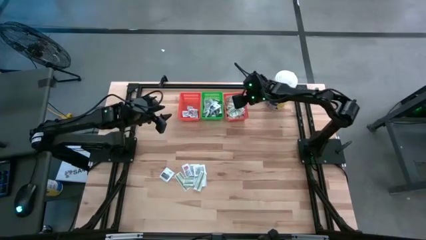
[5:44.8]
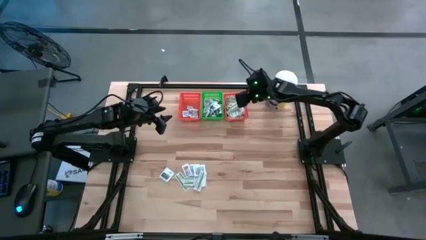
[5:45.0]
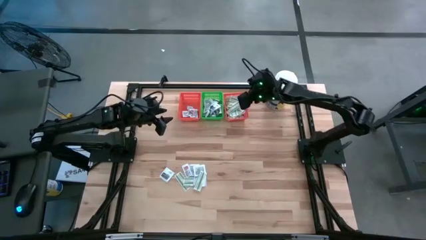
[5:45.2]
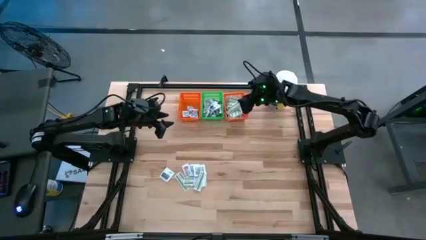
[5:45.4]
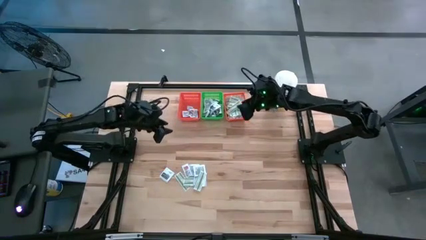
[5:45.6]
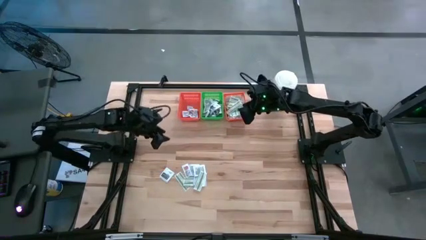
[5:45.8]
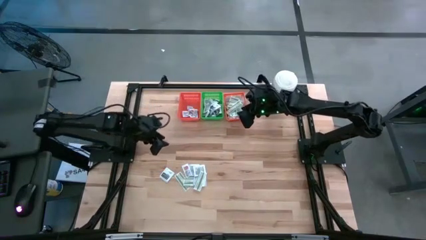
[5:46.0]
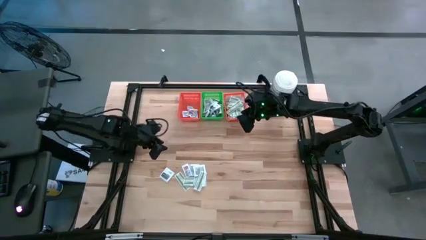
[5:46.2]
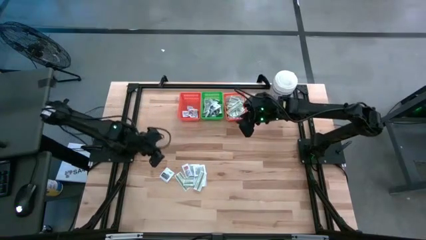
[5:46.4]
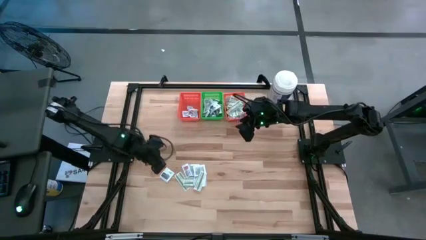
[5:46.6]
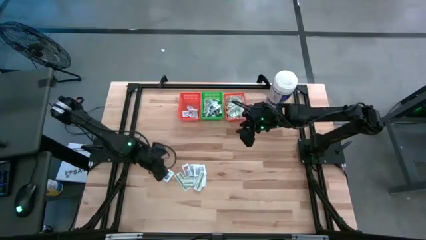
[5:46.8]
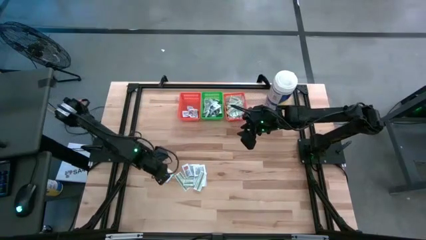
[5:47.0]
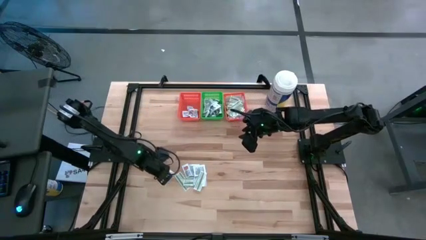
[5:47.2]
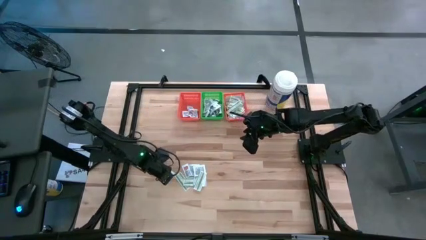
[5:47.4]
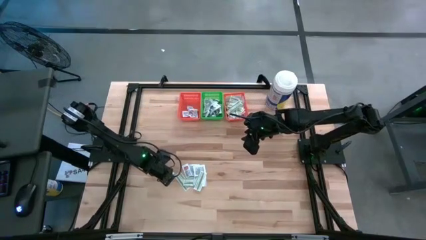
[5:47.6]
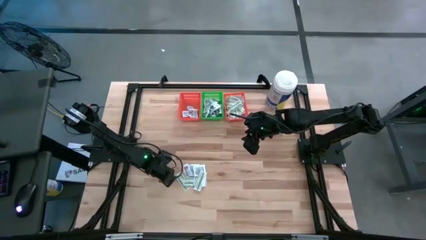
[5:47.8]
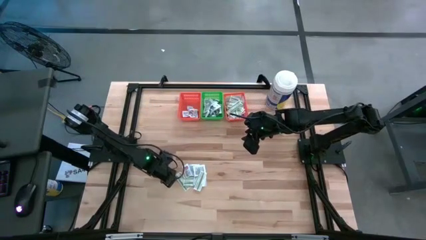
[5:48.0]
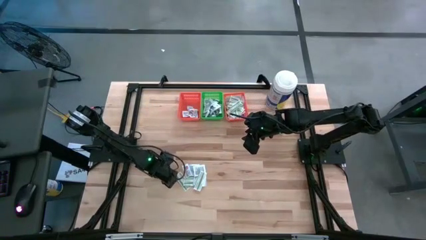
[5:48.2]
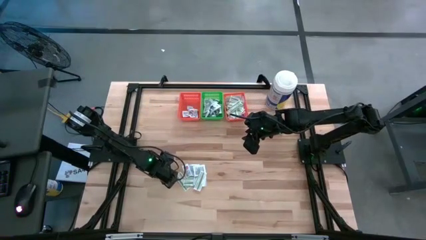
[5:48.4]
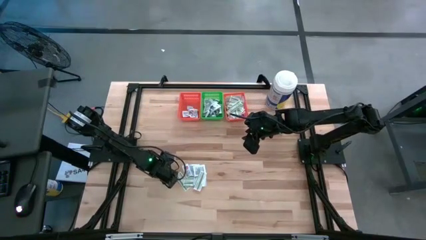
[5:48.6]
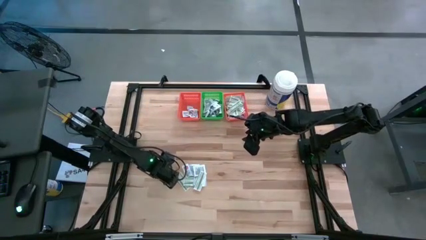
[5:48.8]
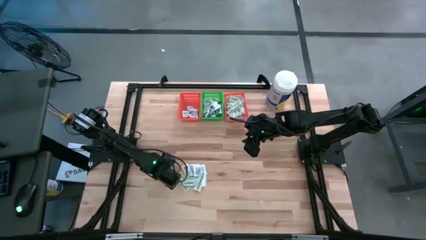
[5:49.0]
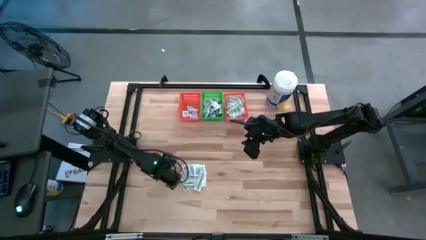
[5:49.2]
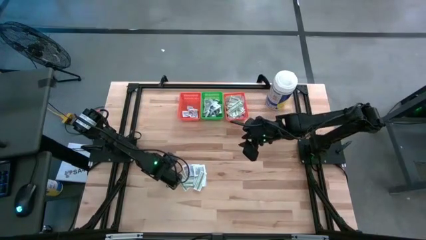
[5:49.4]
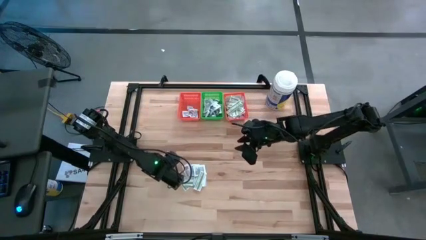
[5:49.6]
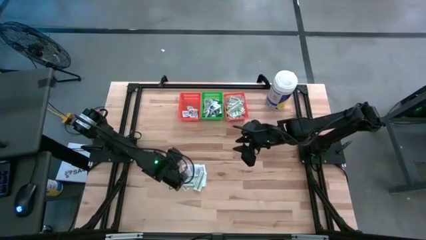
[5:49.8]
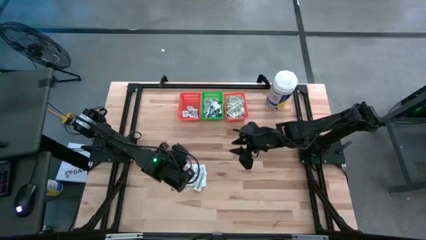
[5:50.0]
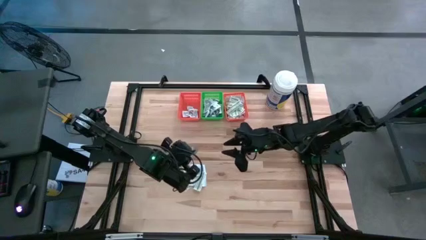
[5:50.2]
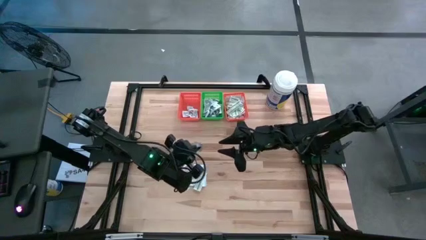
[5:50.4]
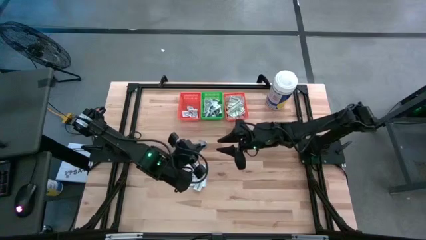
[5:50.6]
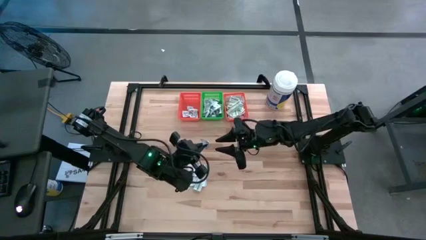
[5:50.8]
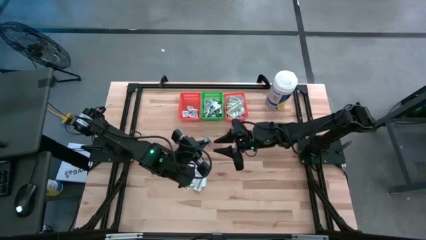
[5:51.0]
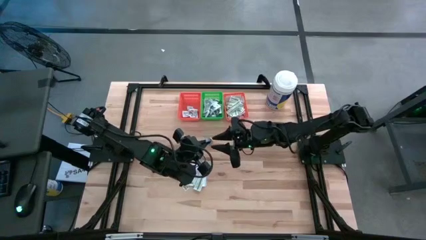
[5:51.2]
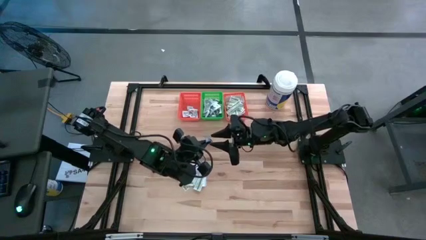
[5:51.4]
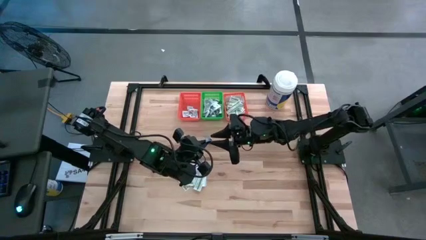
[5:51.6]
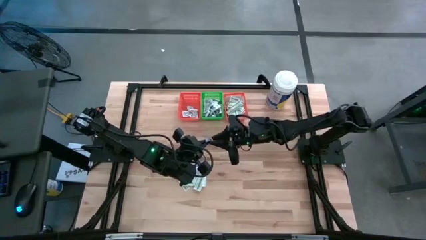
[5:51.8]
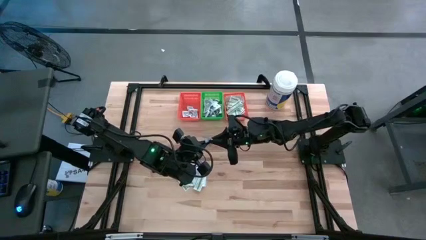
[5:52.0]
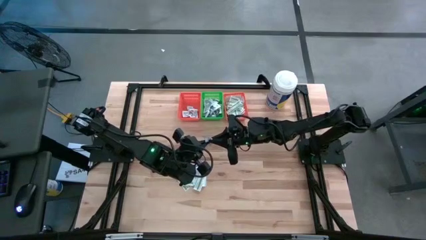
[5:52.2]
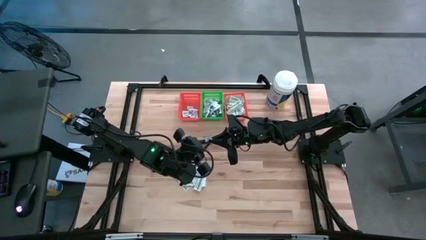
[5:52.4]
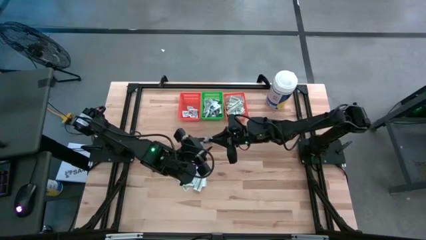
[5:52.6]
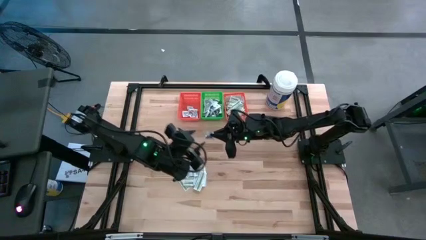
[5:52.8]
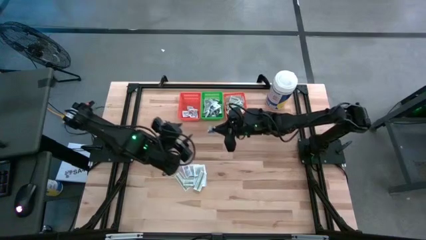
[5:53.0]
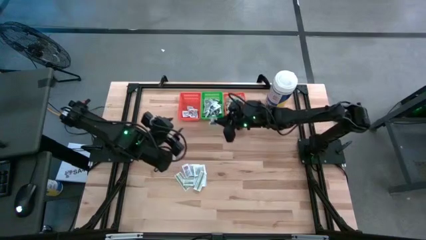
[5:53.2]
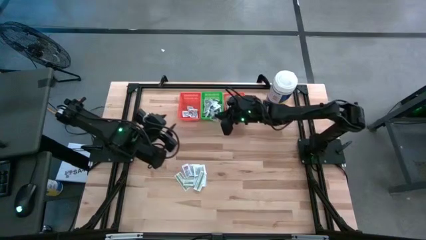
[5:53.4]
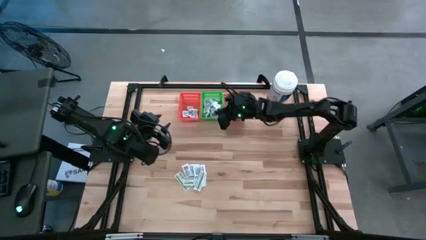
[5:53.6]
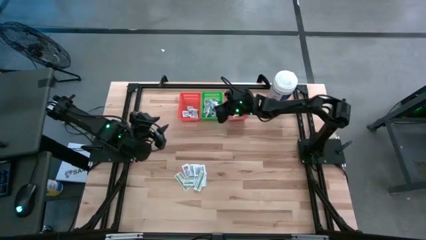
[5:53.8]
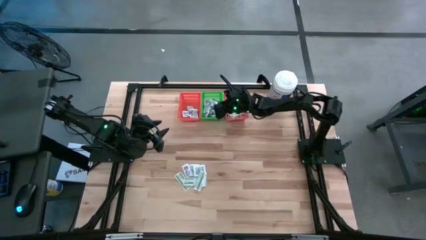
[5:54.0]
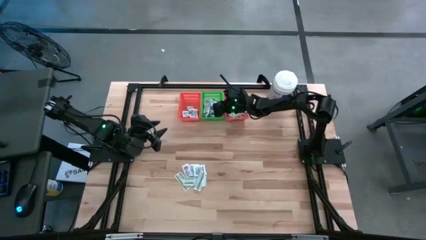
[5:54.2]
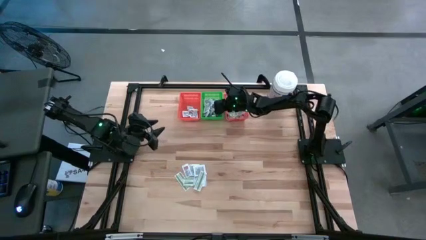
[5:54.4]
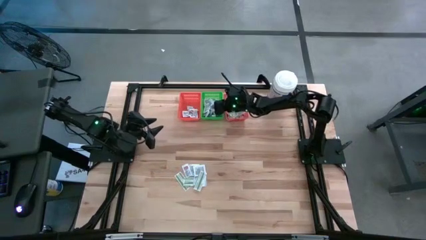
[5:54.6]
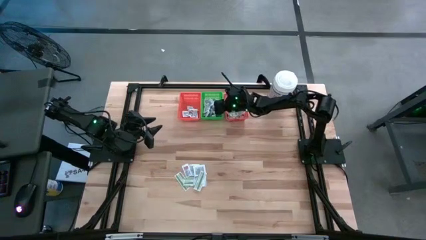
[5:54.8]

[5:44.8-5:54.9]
Task: Pick & Place First Aid Supplies
Put the towelette pack into the green bin

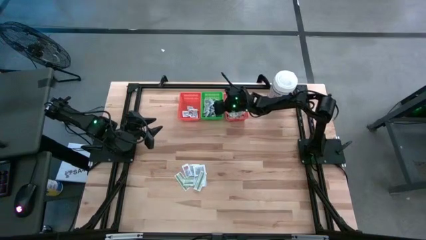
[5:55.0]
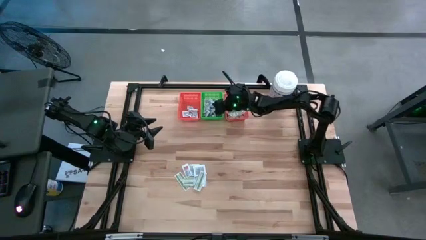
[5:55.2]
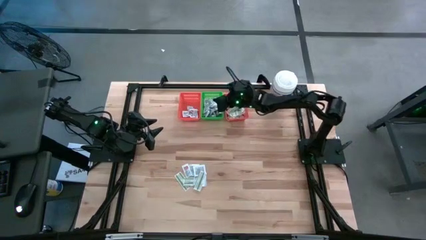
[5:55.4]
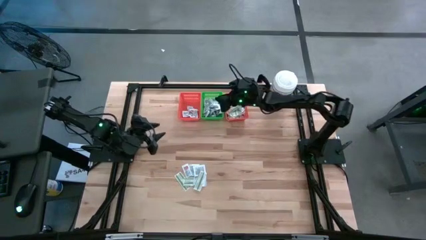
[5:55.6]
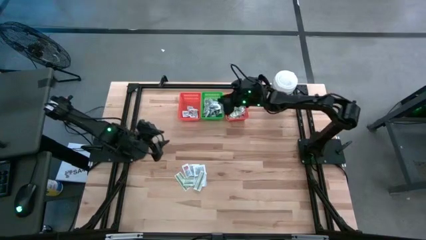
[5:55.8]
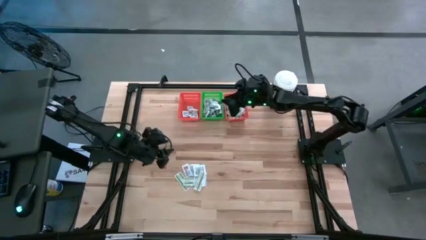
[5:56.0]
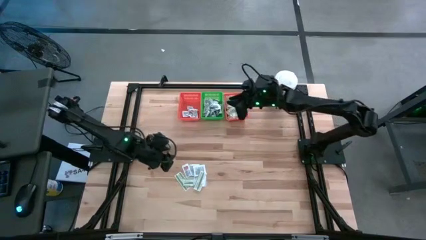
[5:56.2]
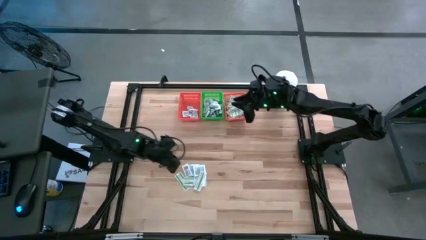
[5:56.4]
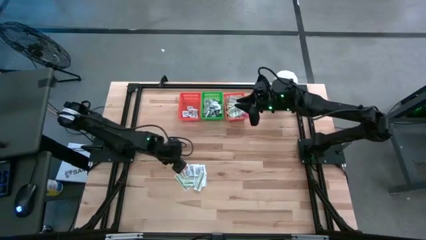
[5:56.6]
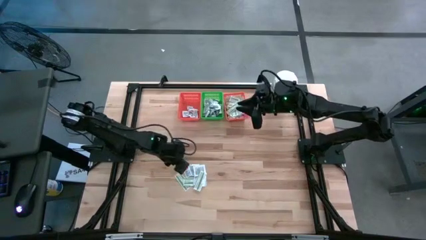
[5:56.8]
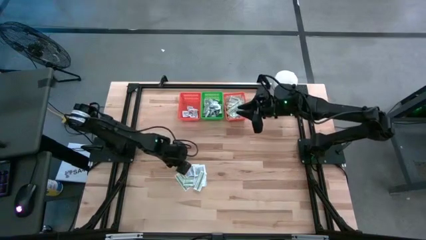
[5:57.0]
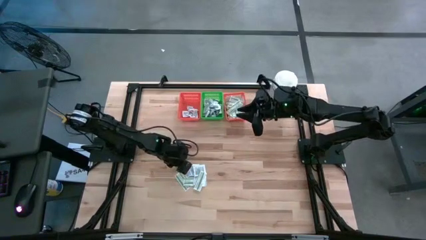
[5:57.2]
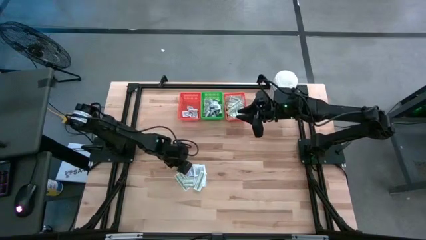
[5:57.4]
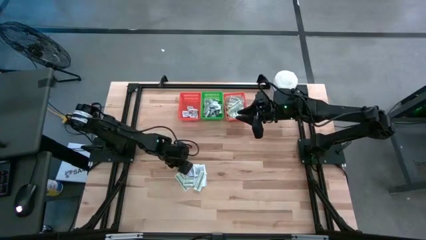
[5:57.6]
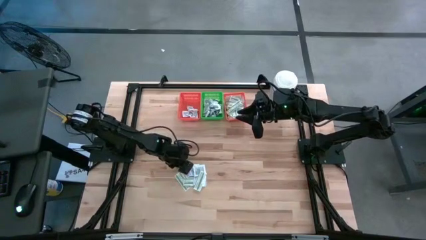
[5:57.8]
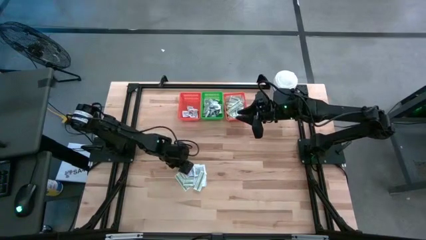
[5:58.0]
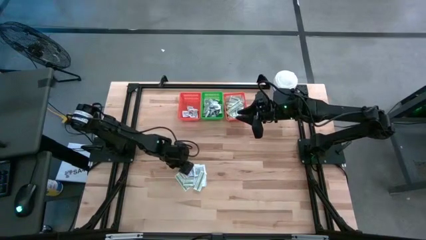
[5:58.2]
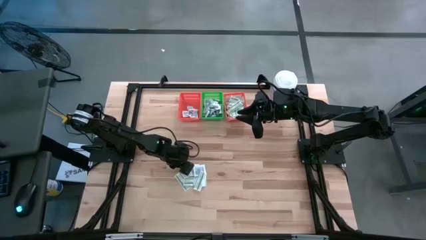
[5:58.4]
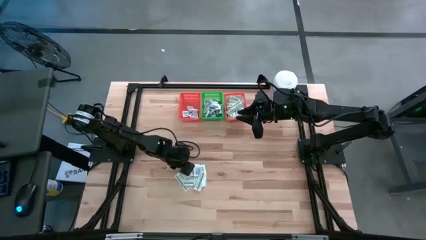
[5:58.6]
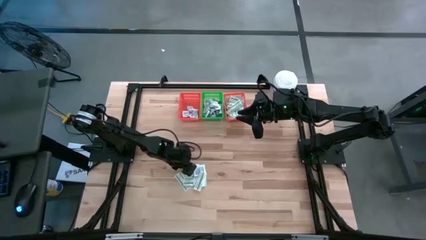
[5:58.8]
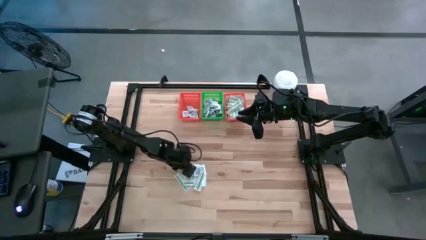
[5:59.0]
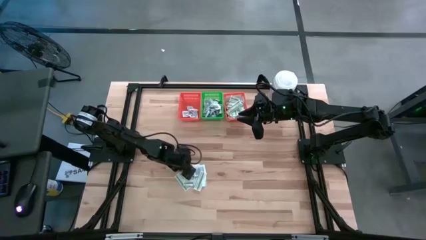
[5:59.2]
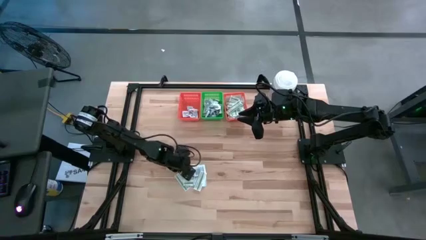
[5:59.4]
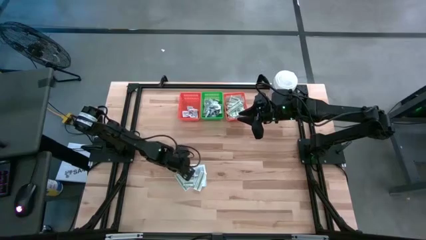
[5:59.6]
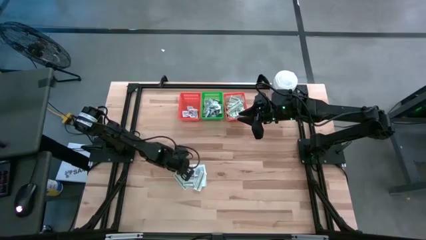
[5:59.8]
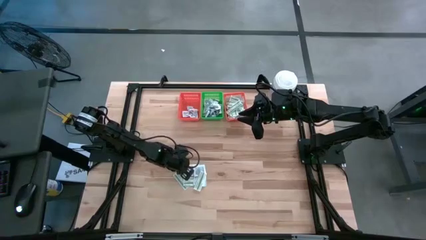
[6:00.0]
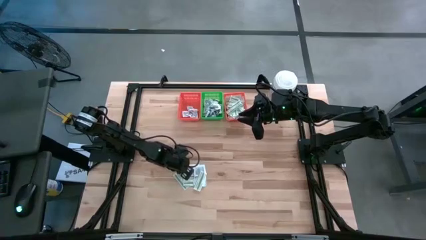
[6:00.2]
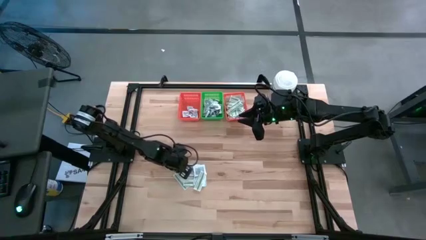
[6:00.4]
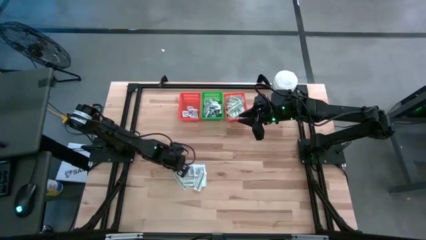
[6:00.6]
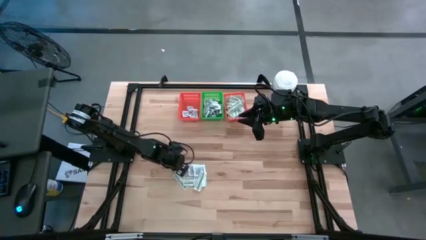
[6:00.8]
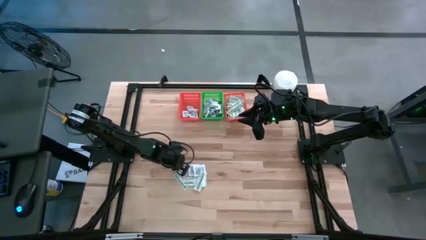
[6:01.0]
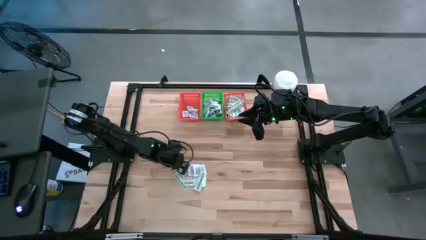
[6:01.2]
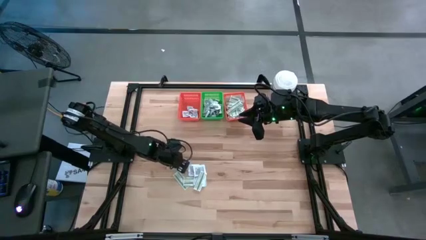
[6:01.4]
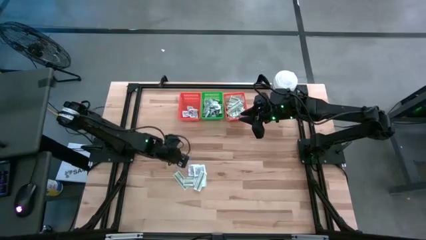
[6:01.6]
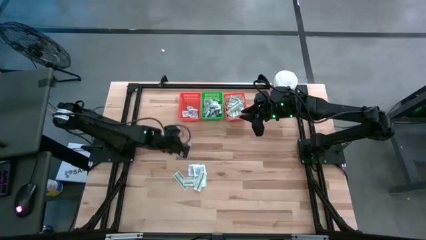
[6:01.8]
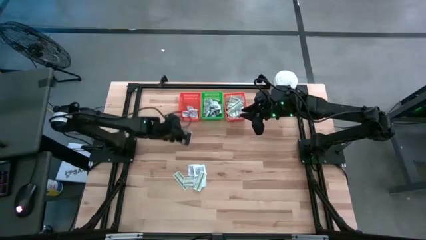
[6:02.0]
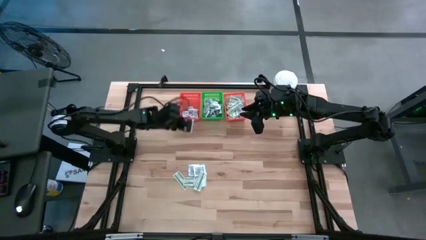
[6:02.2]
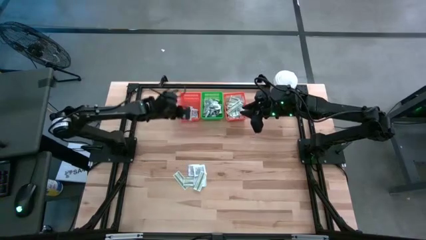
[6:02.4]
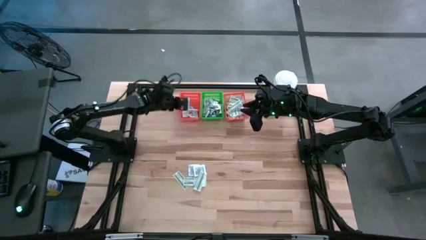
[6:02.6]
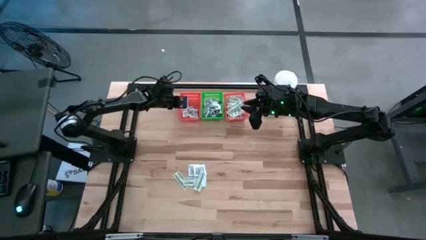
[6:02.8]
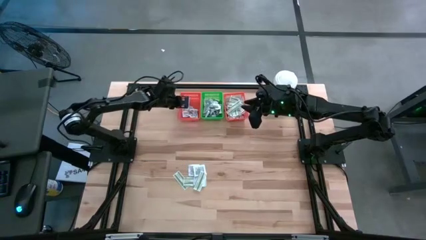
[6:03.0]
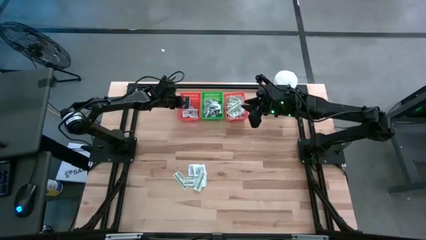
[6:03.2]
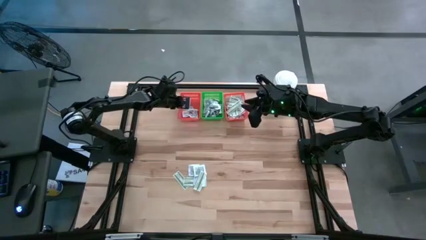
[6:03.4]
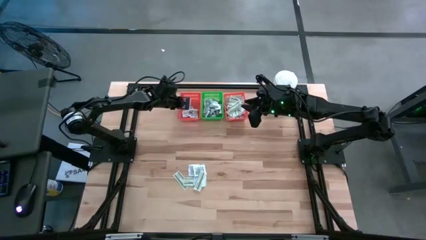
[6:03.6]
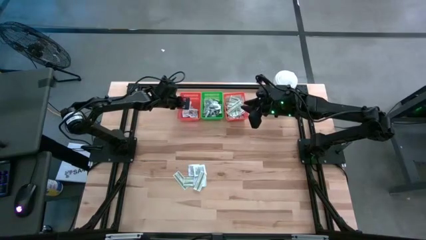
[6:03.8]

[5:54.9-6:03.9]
Put the ointment pack into the left orange bin
